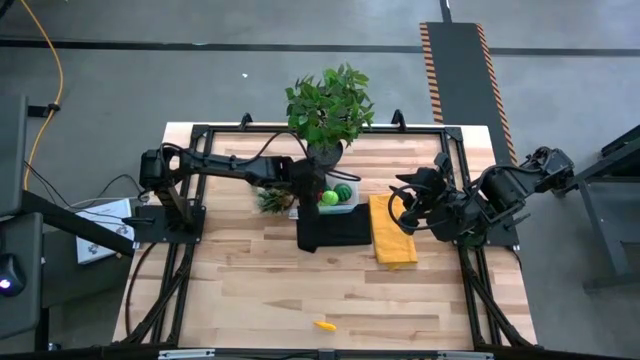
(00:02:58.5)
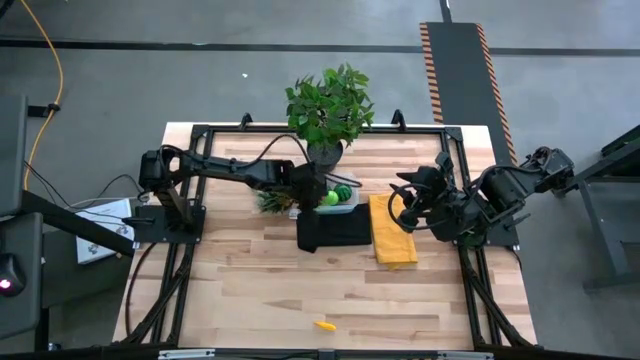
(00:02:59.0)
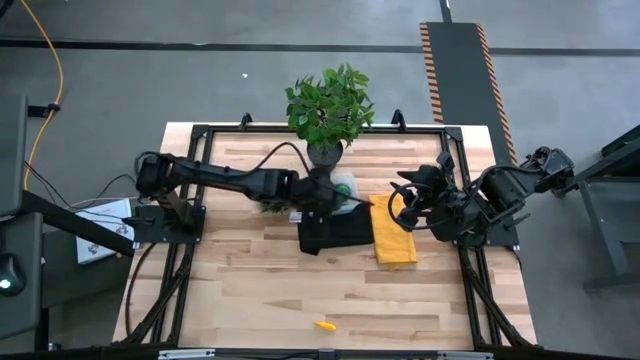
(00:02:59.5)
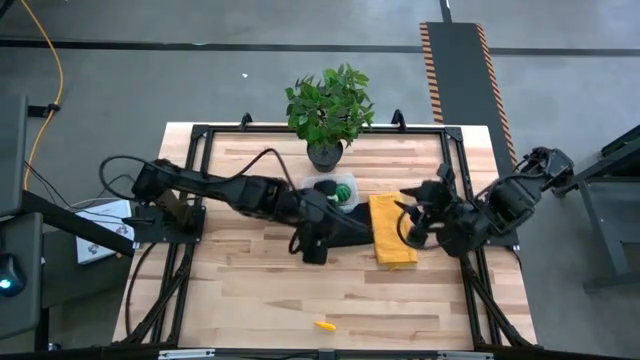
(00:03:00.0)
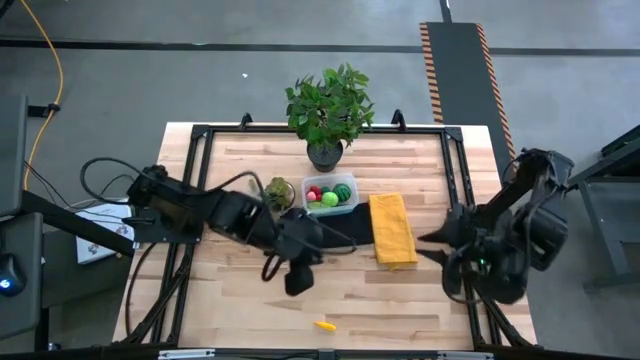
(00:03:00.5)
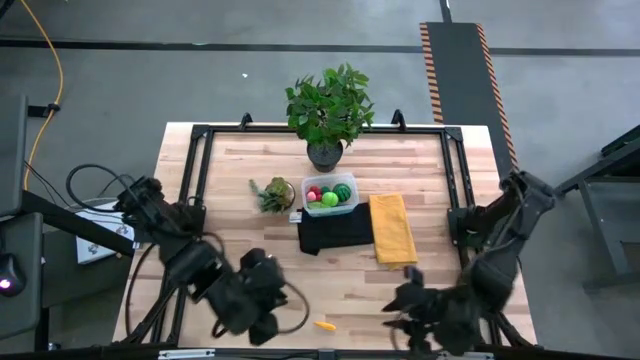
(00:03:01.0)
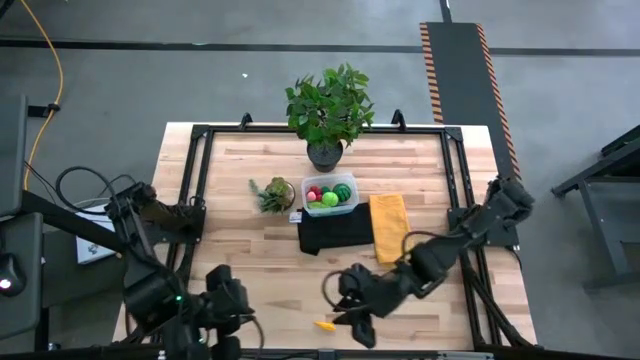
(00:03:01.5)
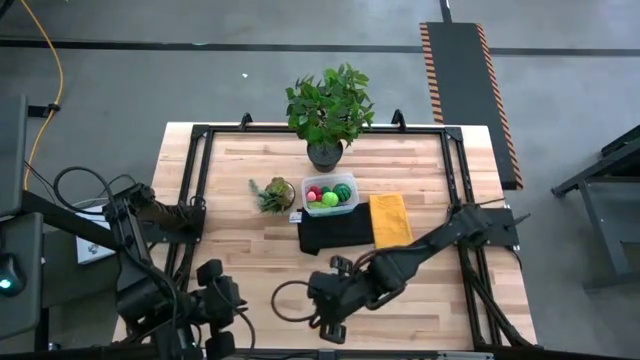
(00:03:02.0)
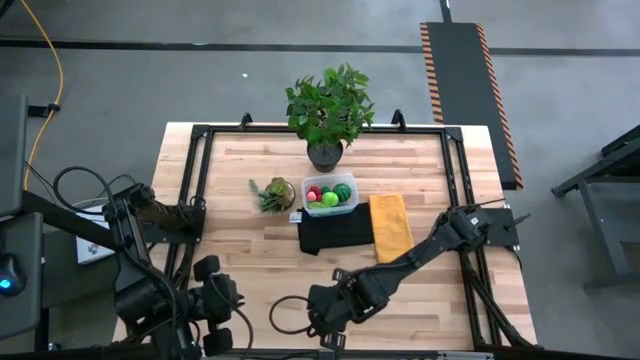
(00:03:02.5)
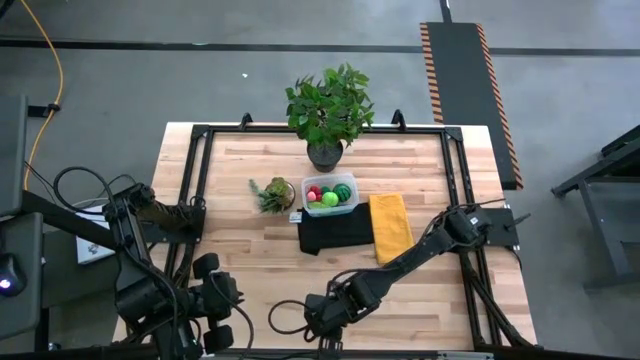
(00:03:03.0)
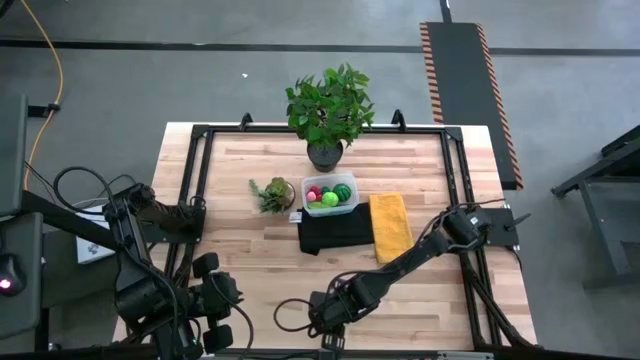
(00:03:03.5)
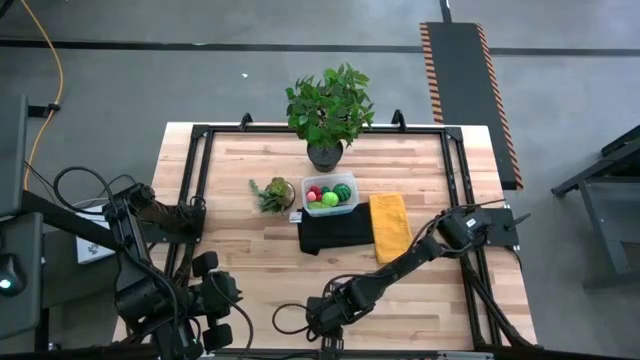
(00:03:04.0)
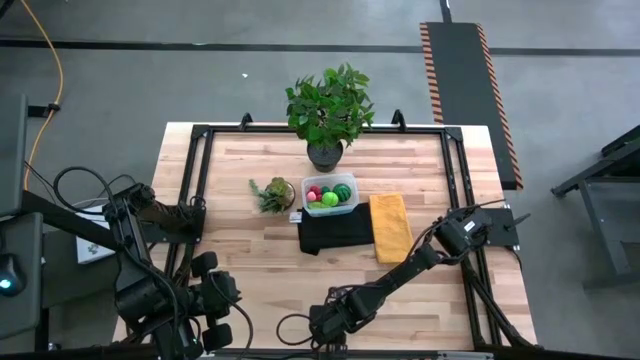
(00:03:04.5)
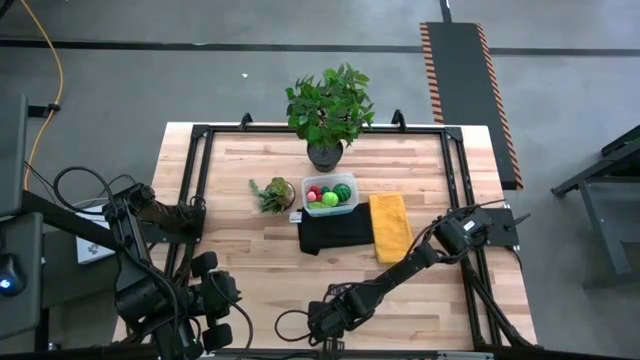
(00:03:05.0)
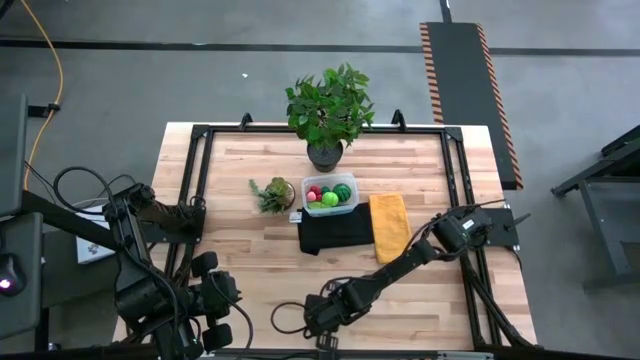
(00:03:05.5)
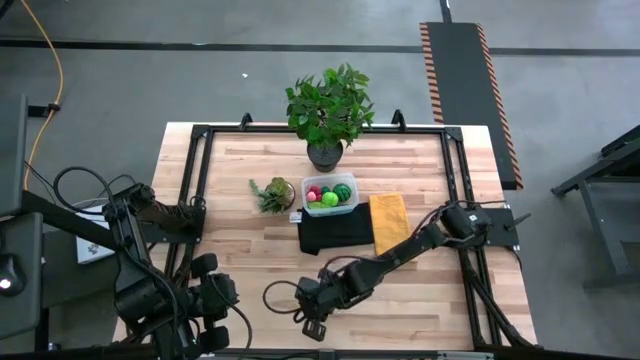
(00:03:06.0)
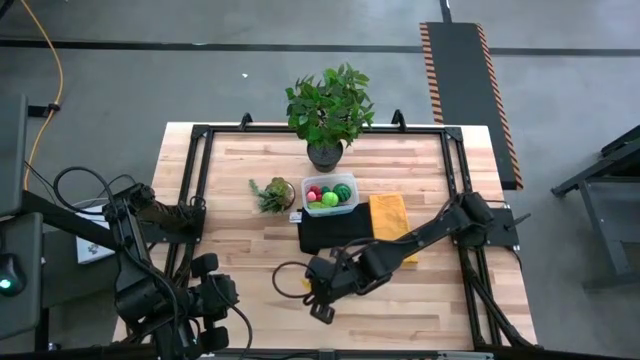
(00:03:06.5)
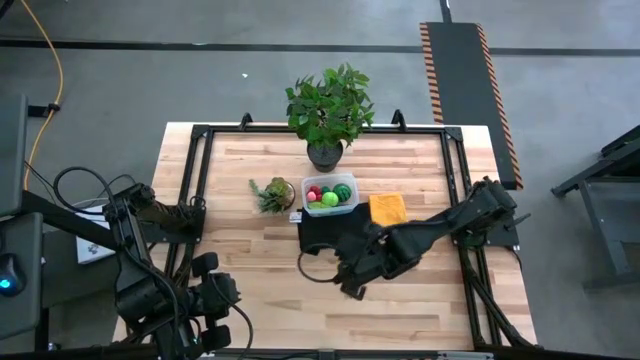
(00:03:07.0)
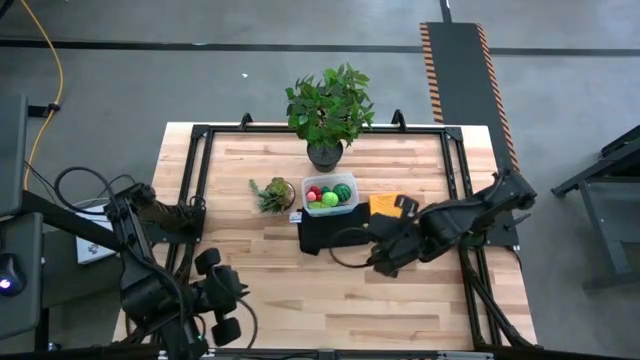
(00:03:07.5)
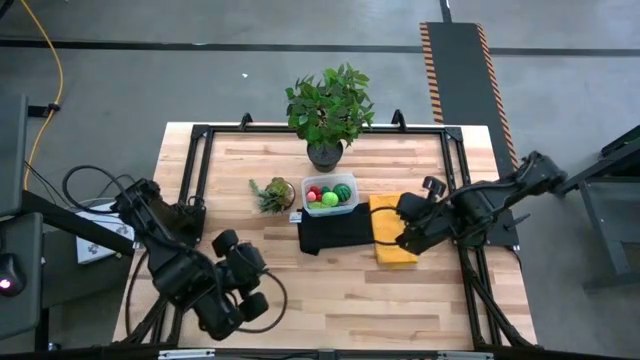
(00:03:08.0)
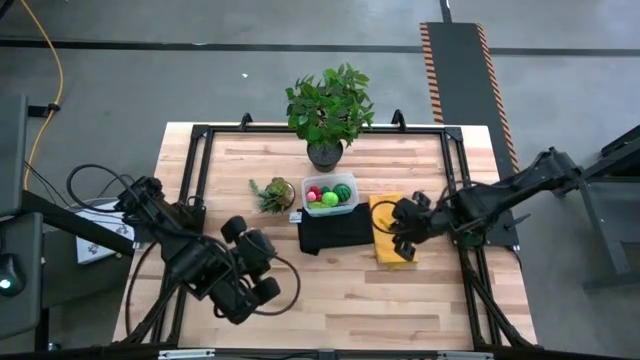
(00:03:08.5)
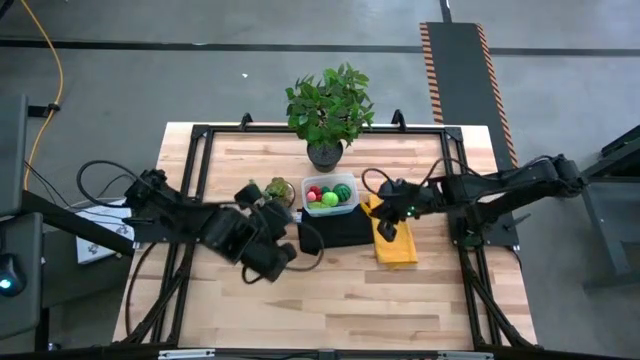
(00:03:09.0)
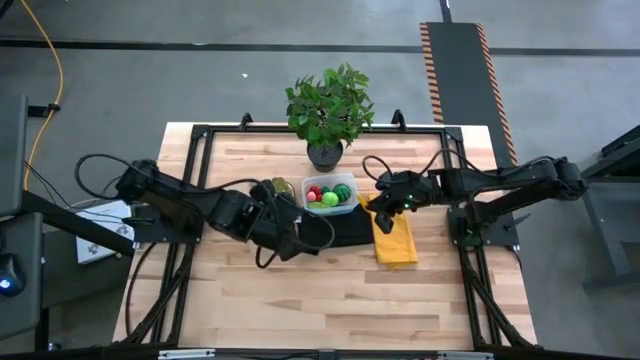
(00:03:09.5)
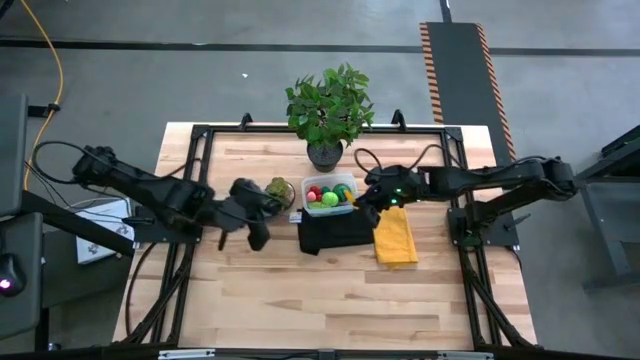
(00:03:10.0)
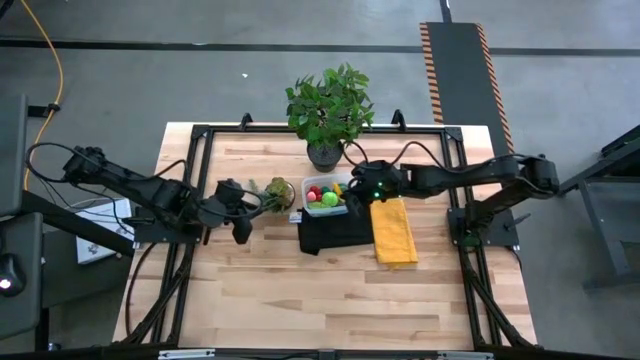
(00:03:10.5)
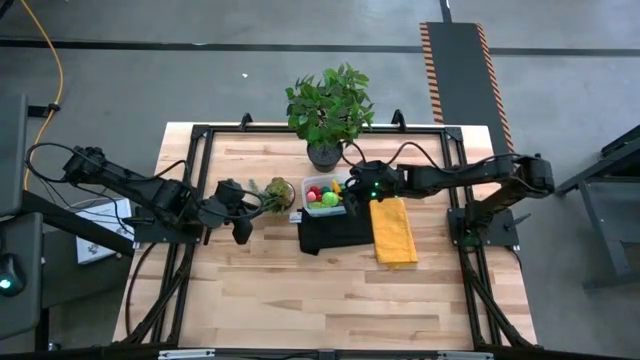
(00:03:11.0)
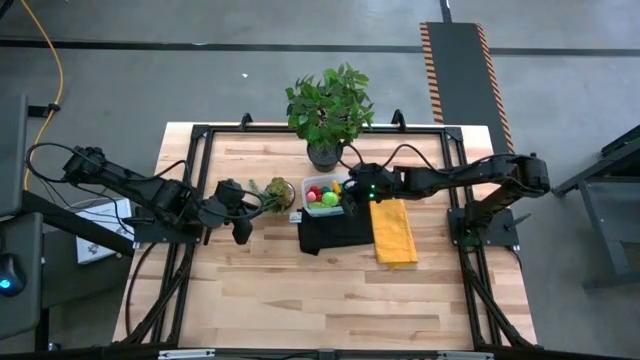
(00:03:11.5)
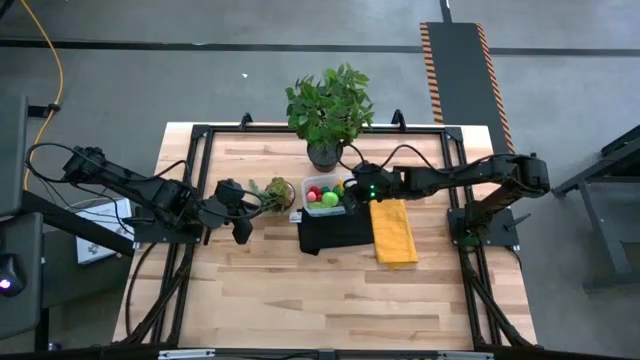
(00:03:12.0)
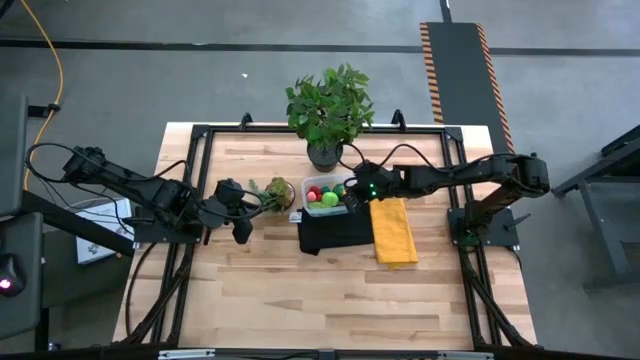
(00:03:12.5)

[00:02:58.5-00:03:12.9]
Task: Pick and placing Produce into tupperware
Put the baby corn into the transparent bin

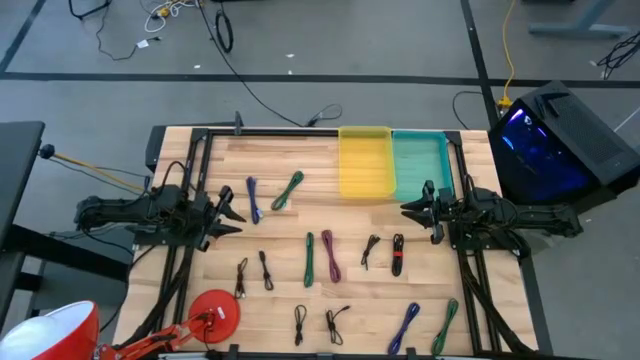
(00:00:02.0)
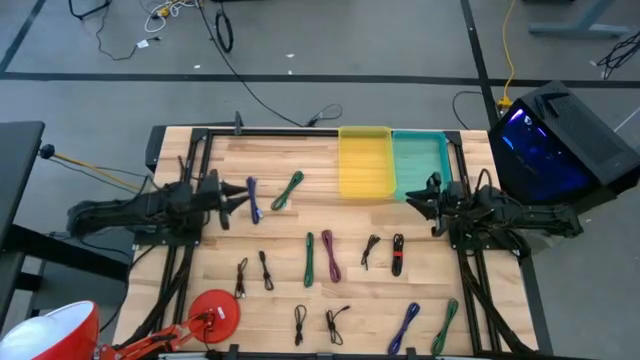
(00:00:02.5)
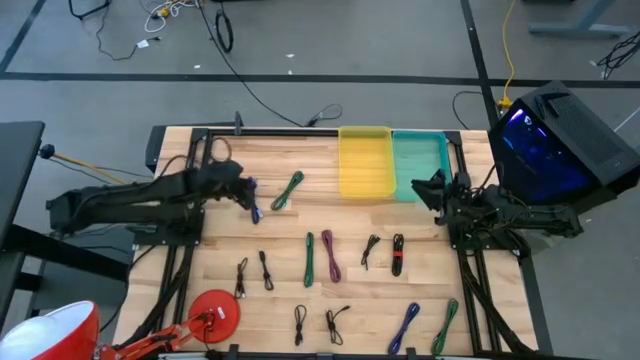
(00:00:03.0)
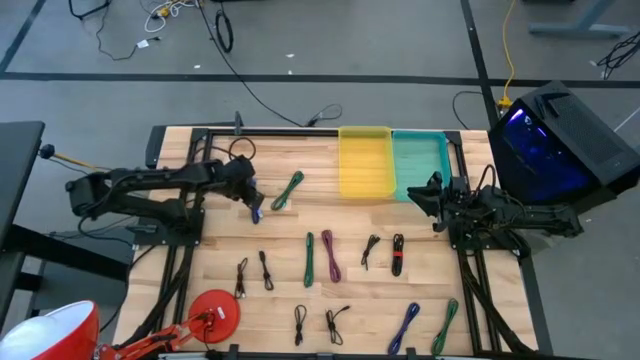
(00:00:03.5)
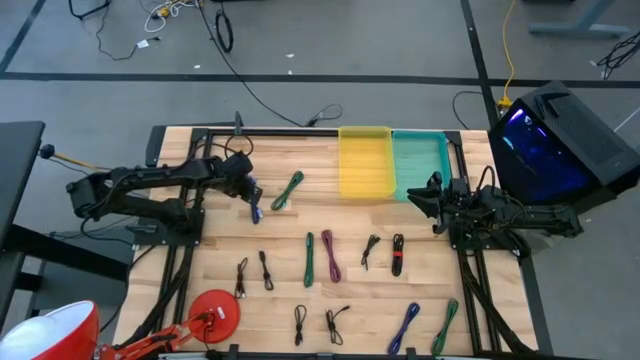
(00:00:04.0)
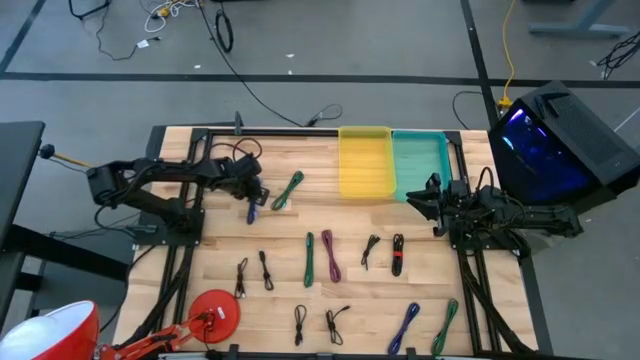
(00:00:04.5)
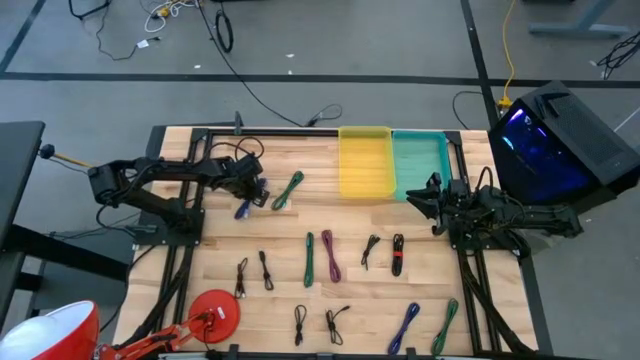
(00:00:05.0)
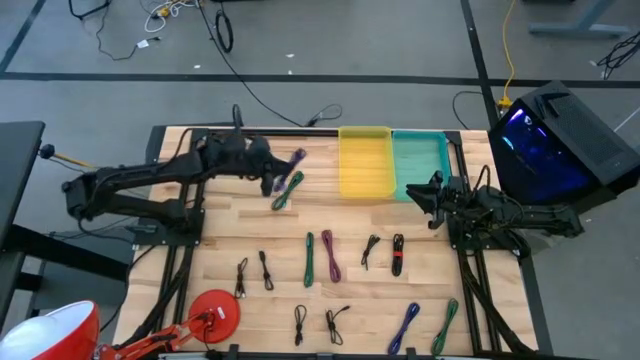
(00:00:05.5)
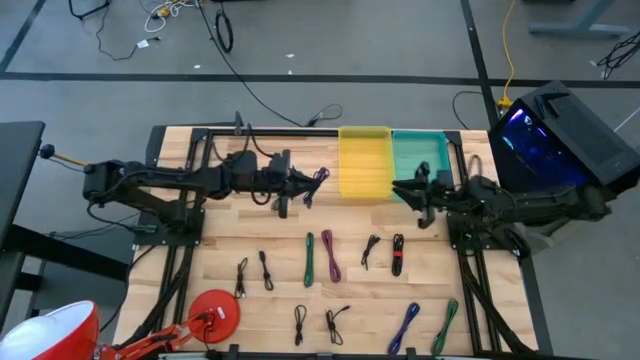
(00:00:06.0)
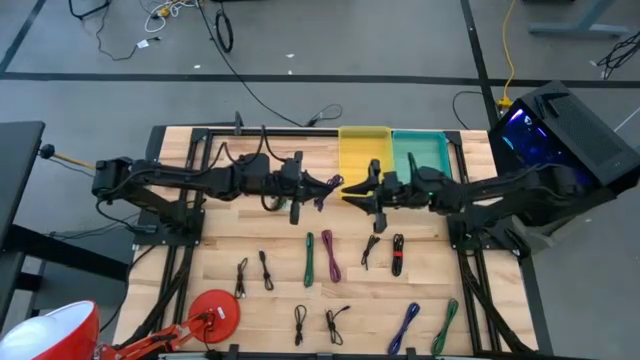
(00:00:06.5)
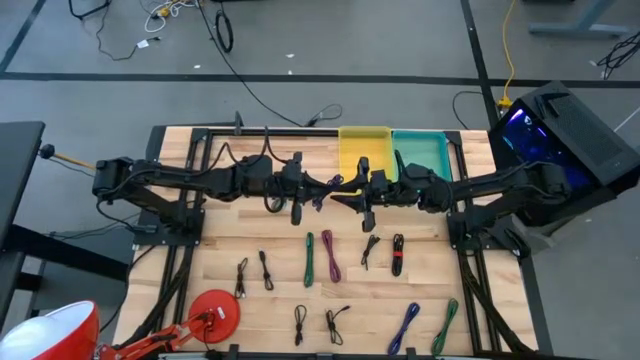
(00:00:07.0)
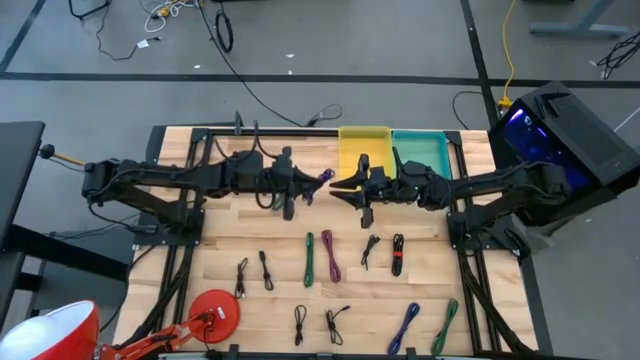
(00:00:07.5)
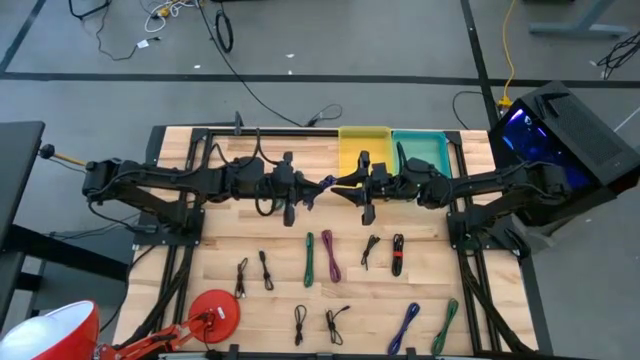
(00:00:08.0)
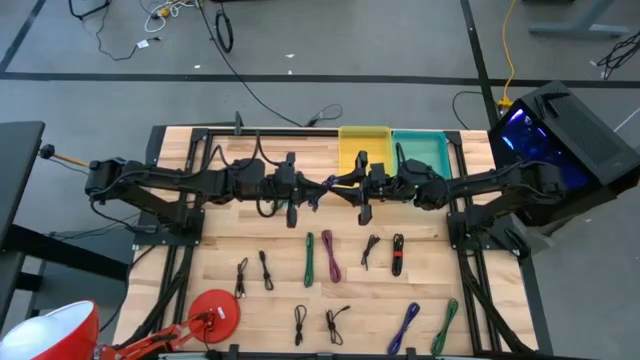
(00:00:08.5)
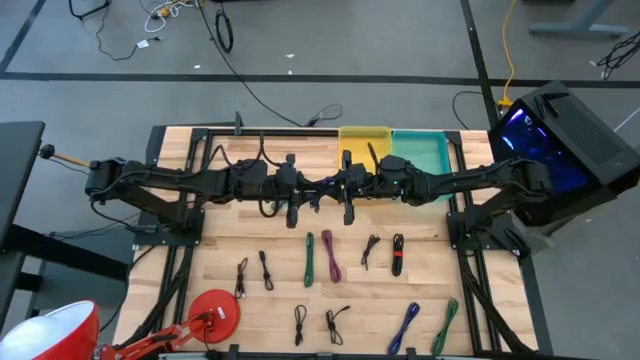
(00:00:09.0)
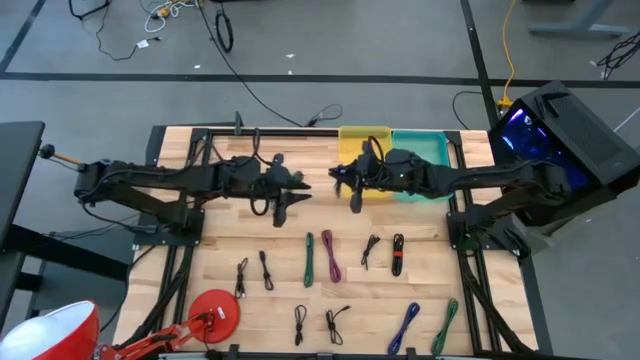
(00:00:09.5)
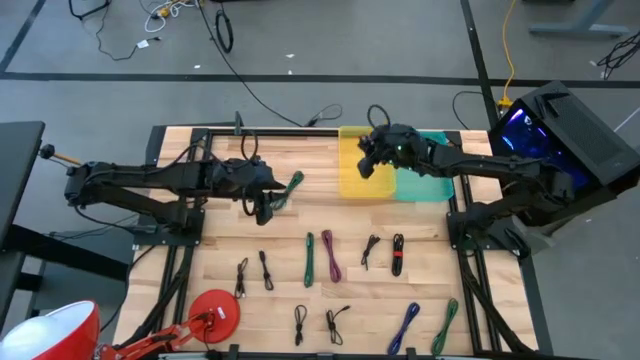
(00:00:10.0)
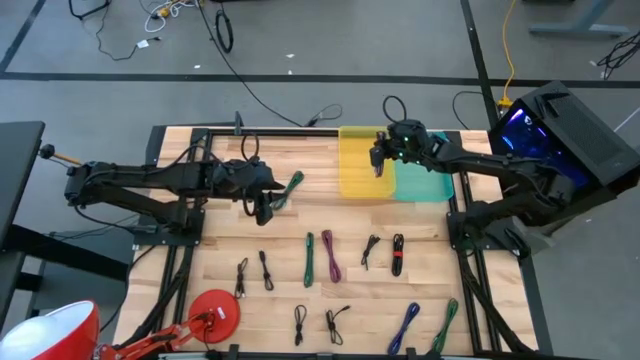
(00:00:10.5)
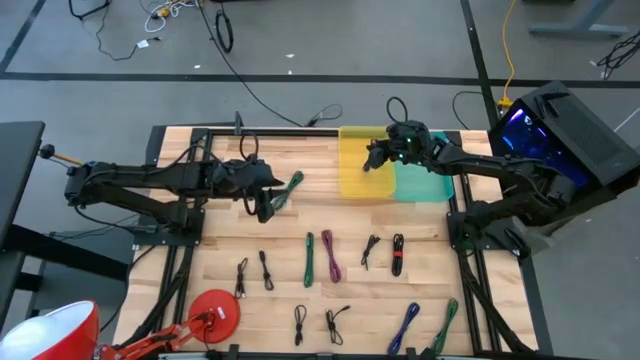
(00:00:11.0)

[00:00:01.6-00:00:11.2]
Task: Pick & Place USB Port
Put the top purple charger cable into the yellow bin
